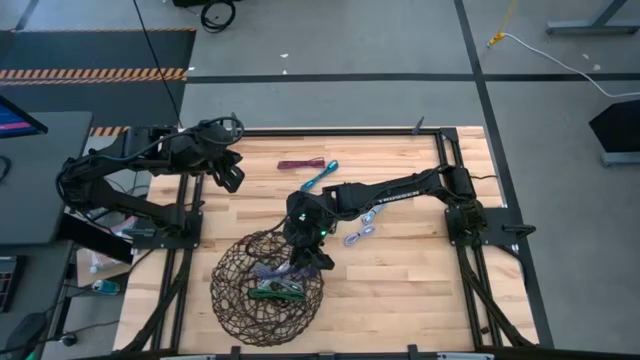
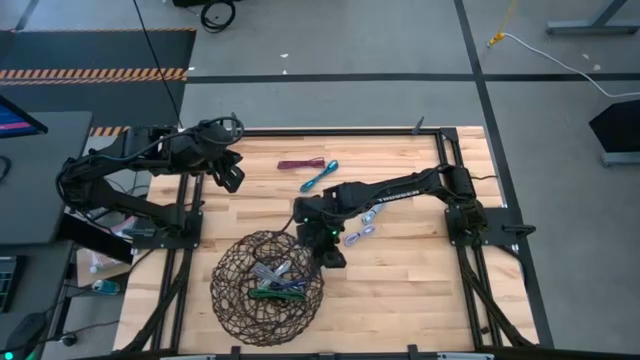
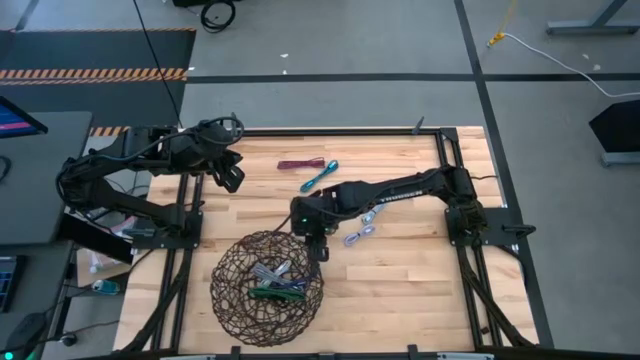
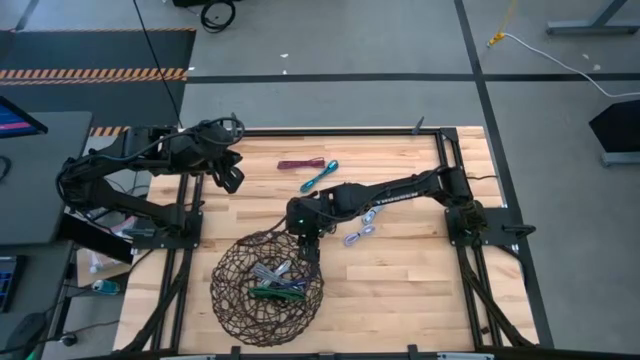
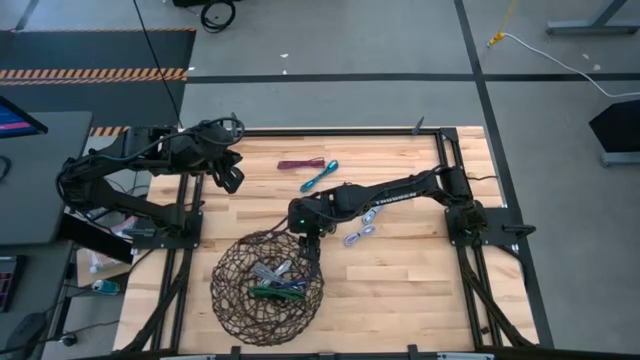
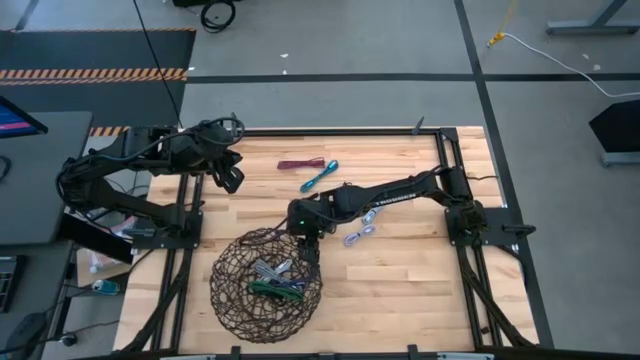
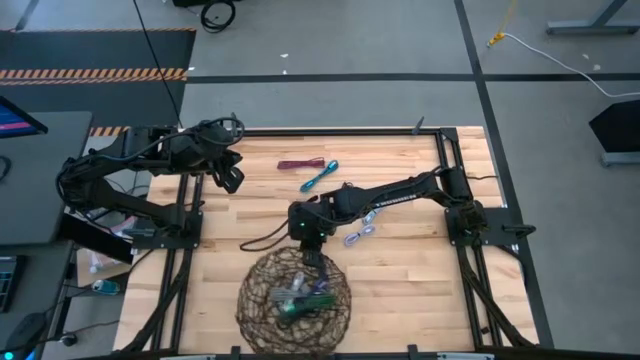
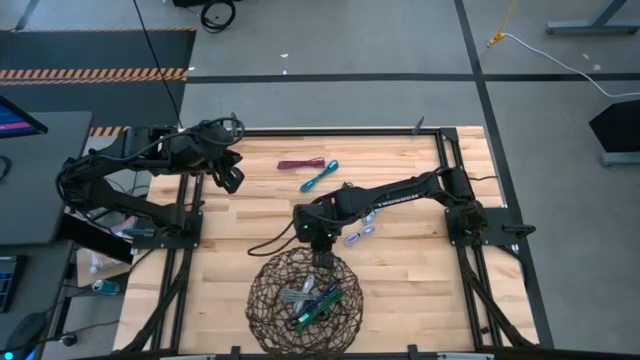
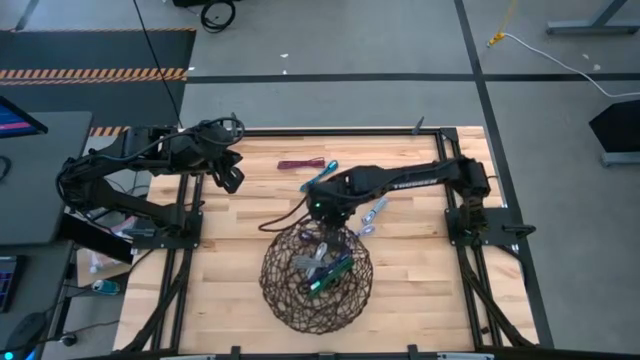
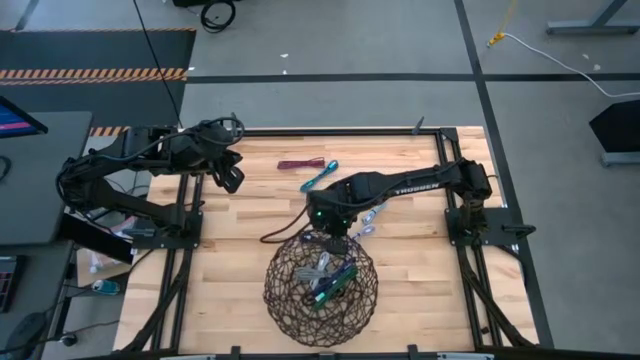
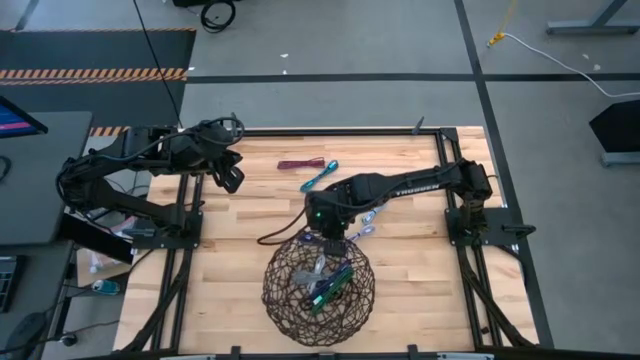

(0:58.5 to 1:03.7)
Task: Pick and place USB-C Cables
Move the wire basket to the bottom center of the table

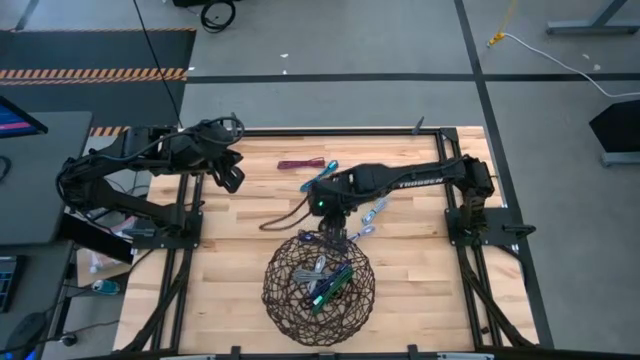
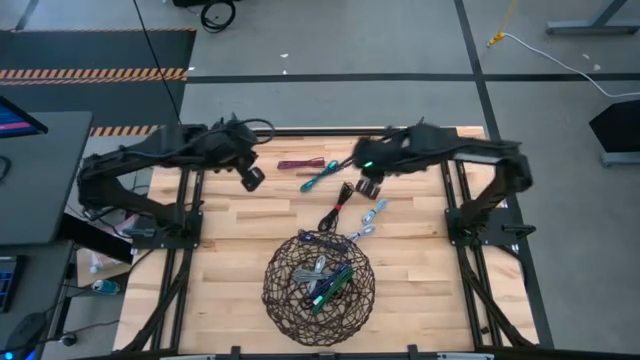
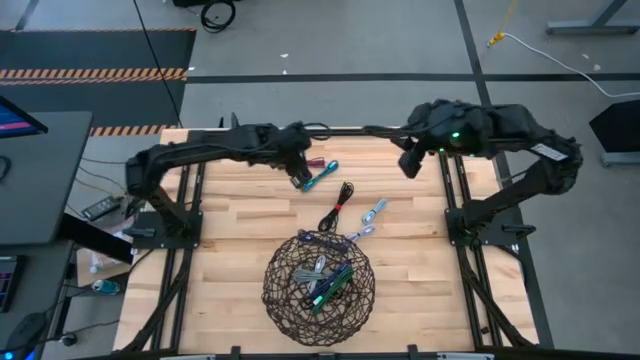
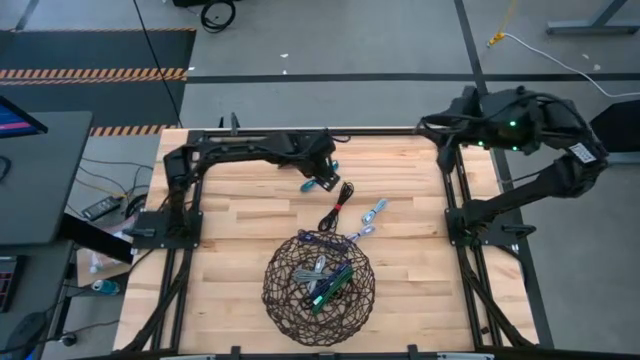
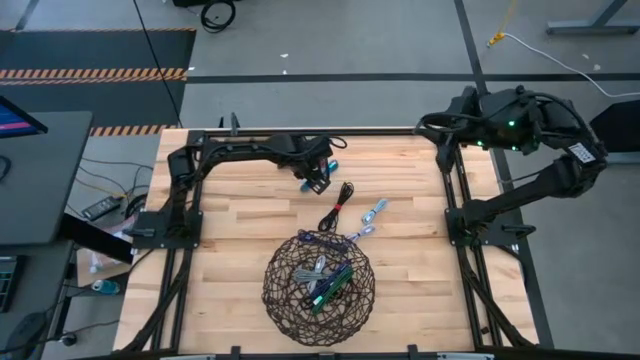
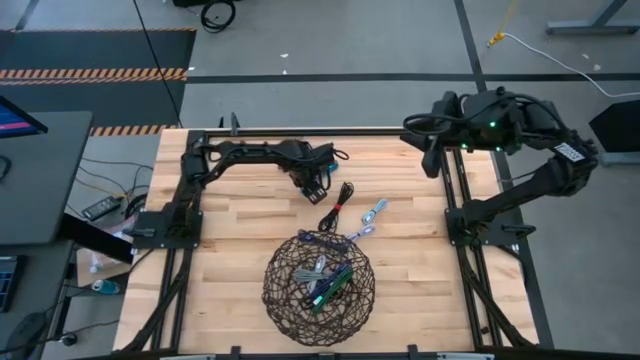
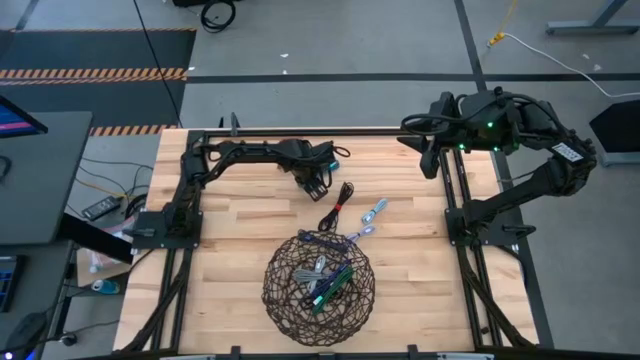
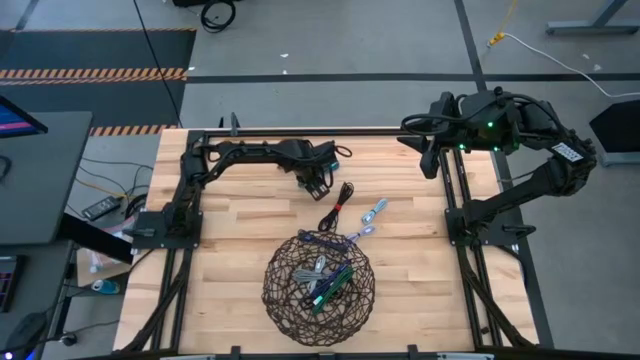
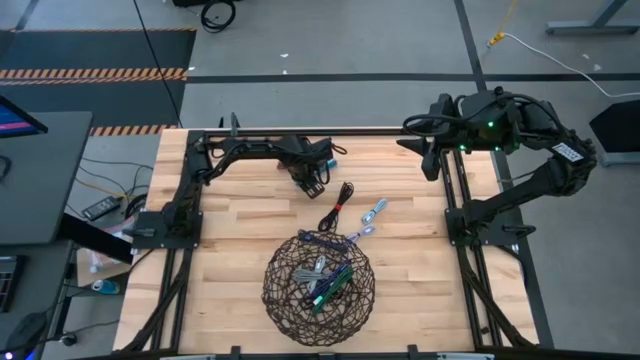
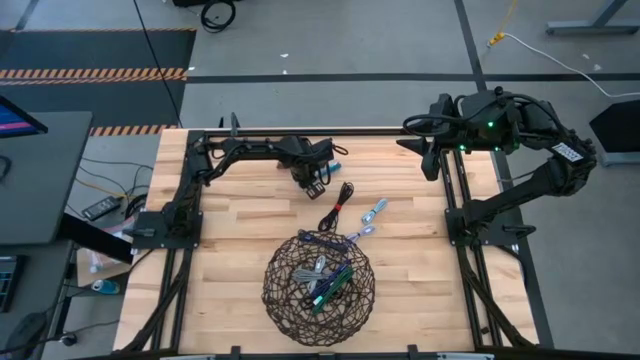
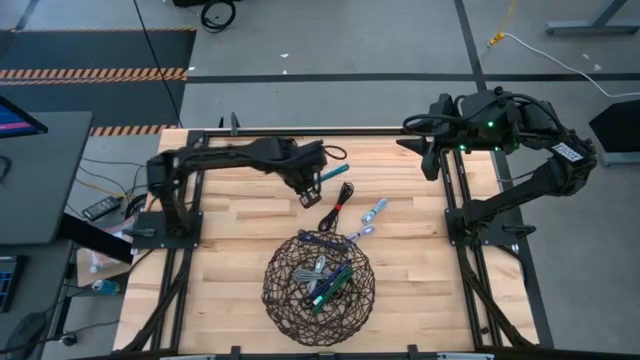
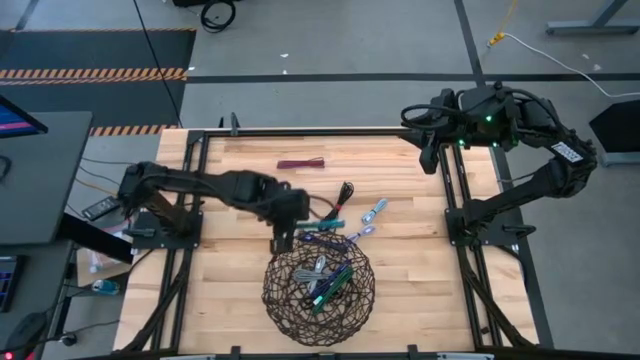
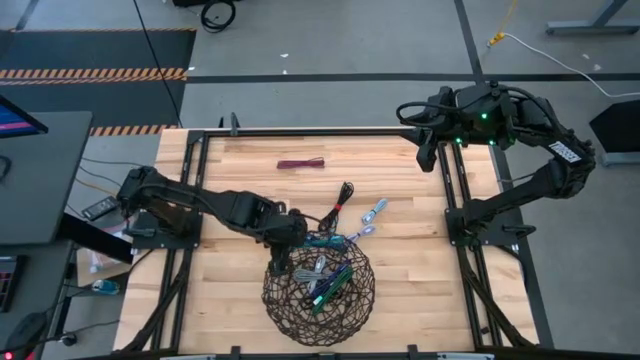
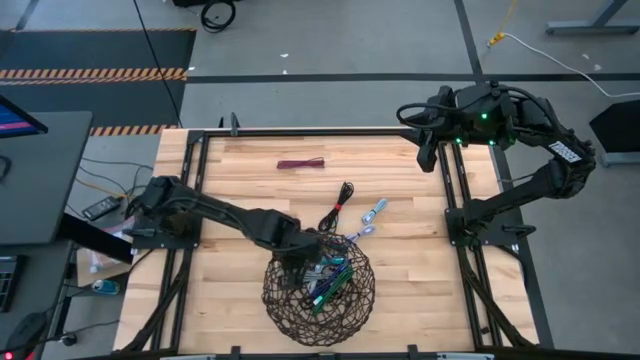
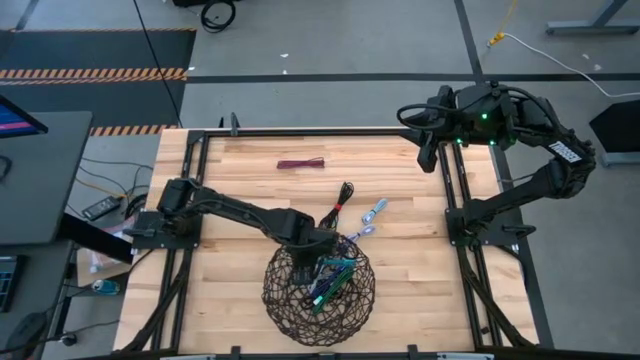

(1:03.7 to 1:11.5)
Put the blue charger cable into the wire basket

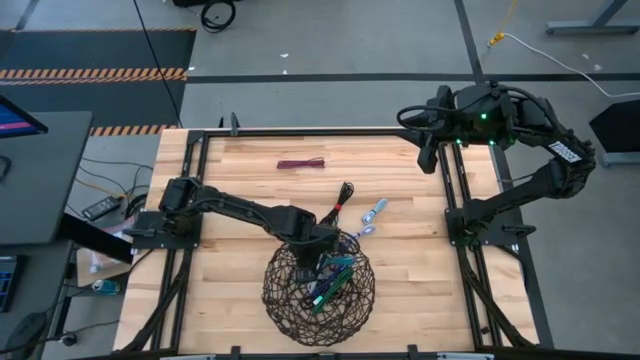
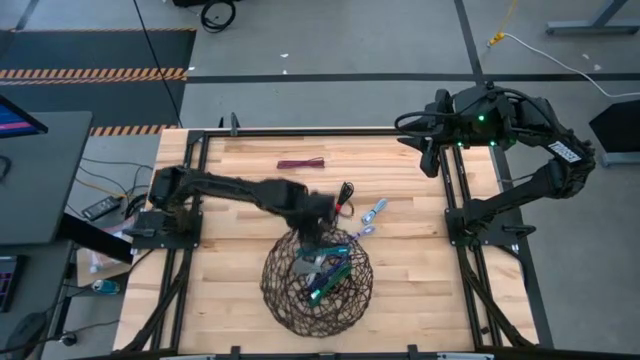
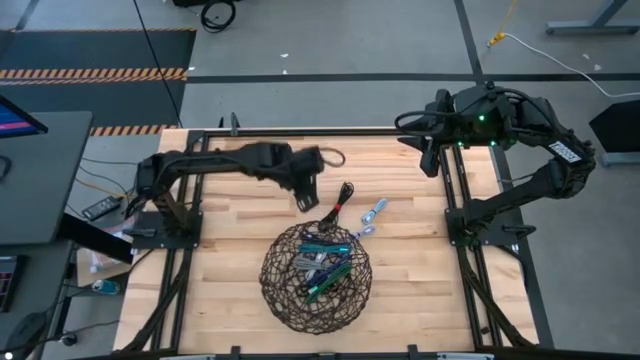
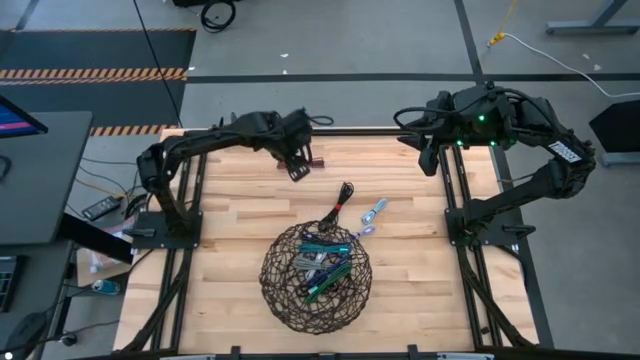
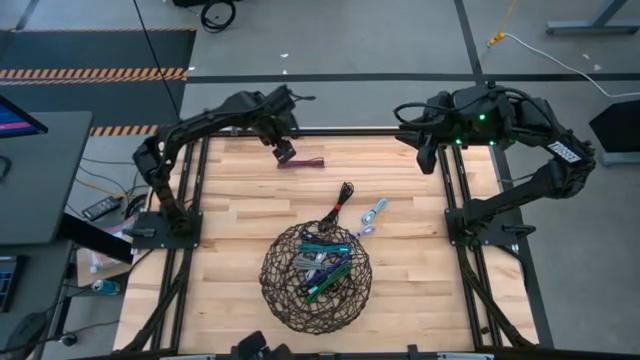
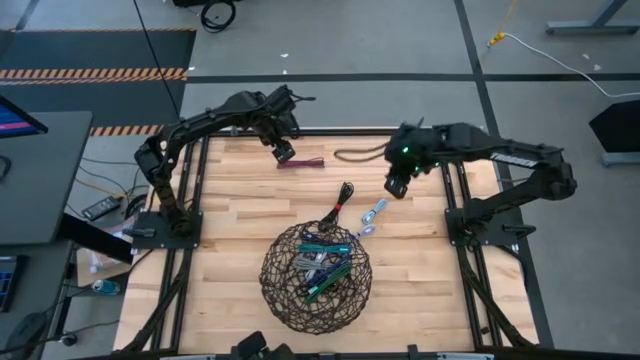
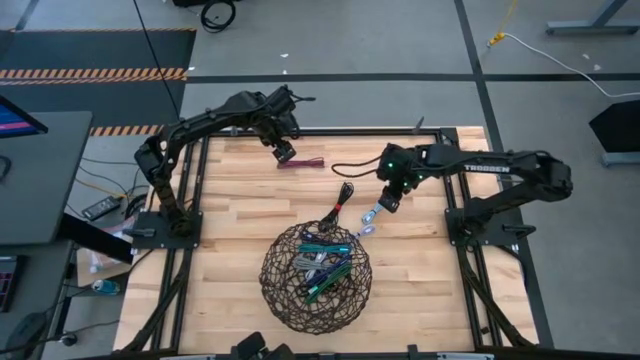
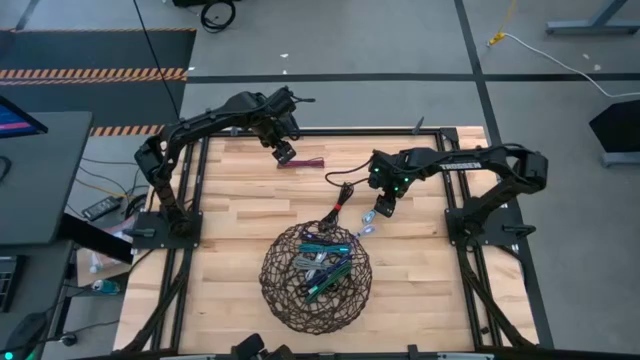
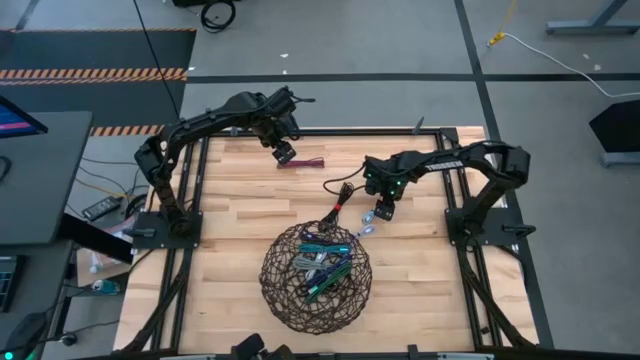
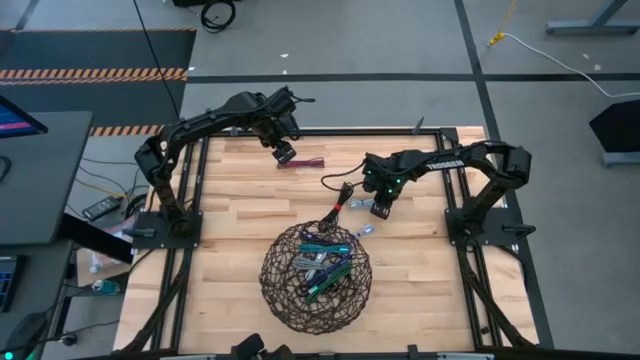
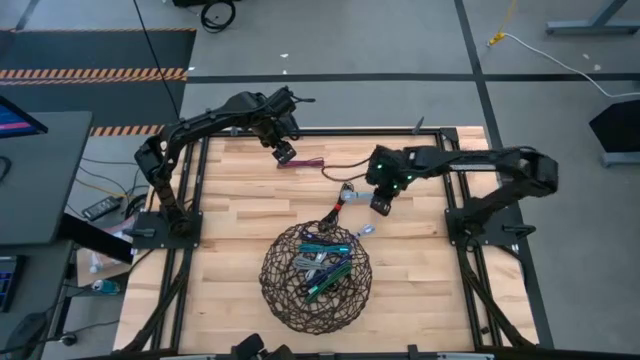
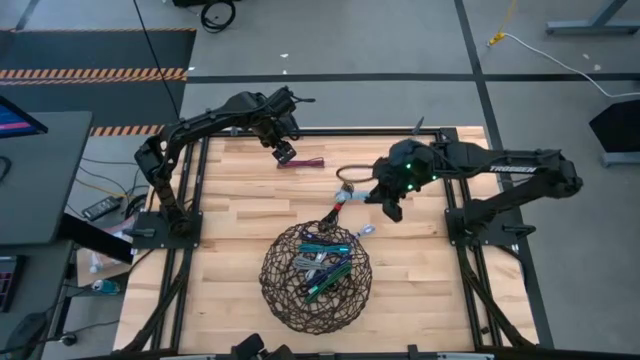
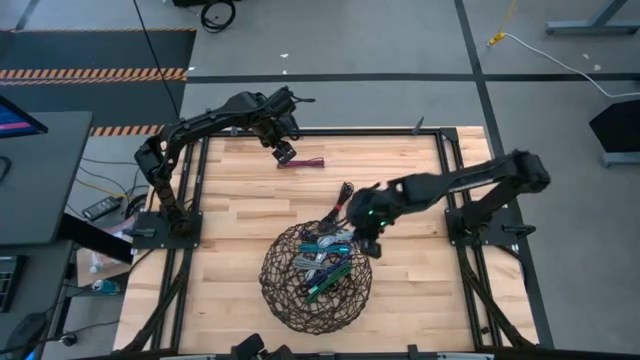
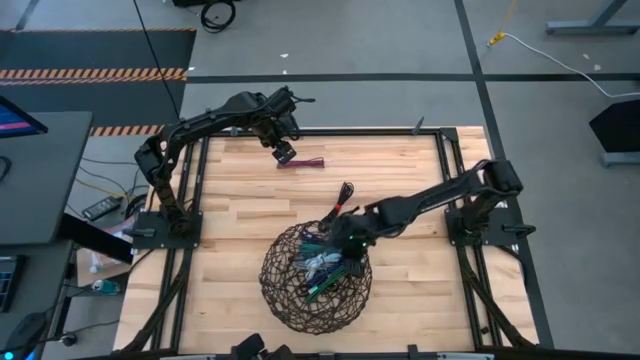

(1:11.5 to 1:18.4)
Put the white charger cable into the wire basket

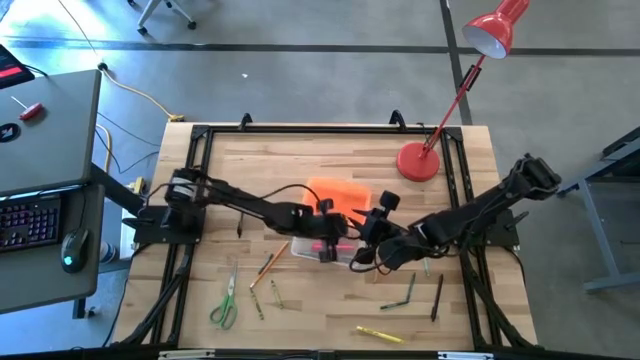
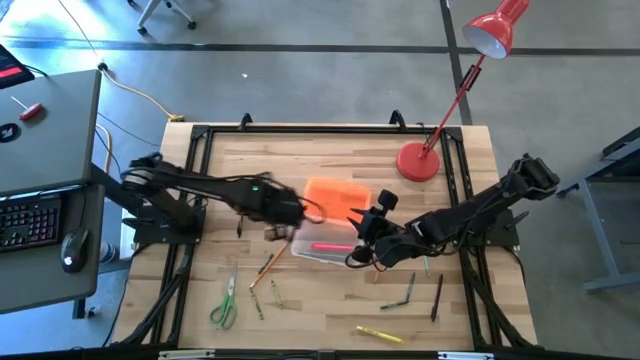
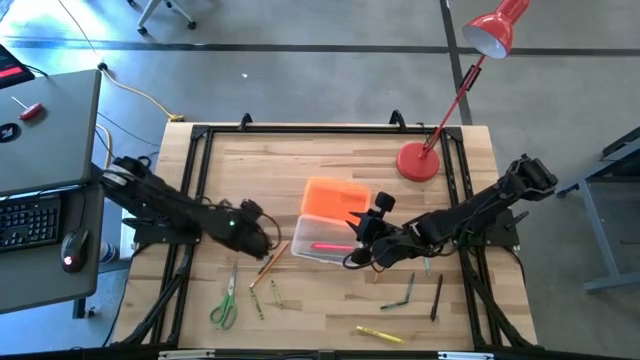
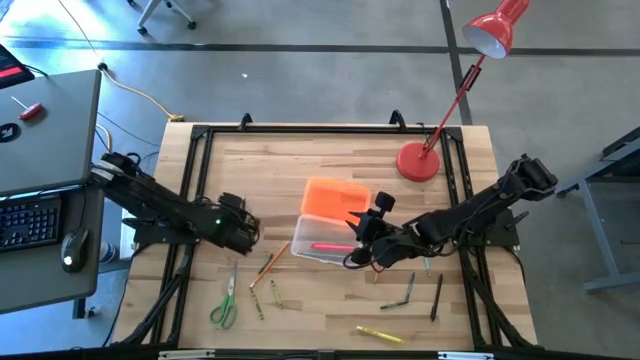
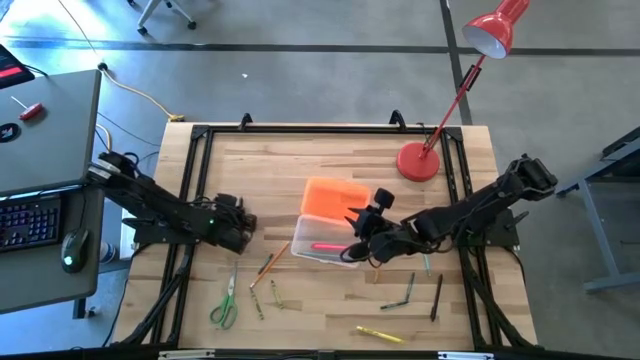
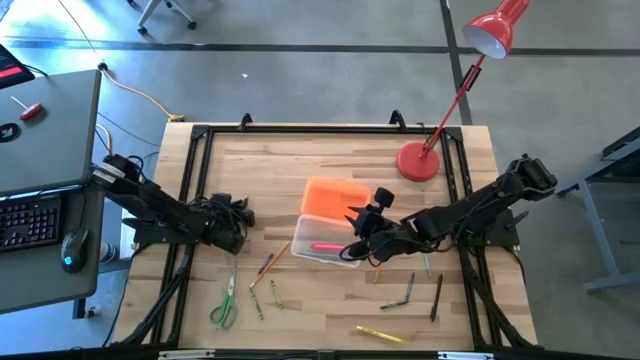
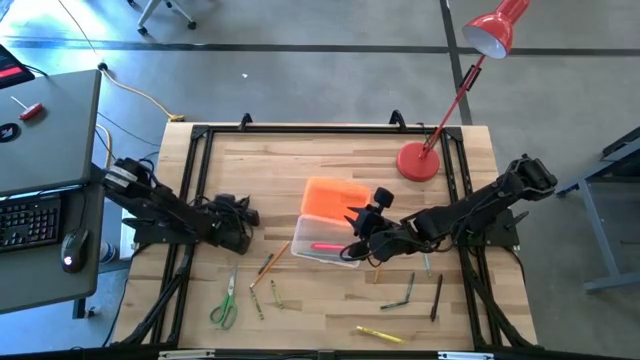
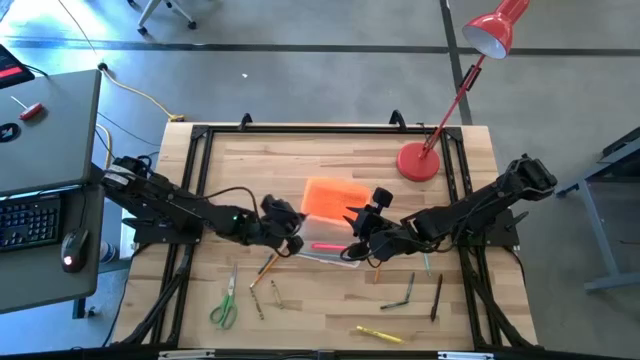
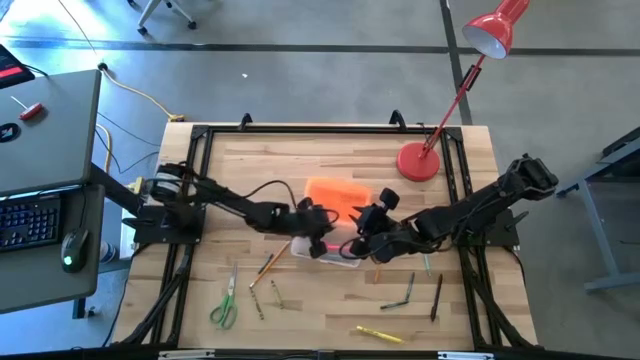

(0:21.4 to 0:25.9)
Task: Pick & place school supplies into a supply box
Put the left black pen into the supply box
